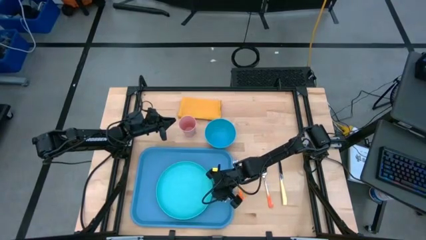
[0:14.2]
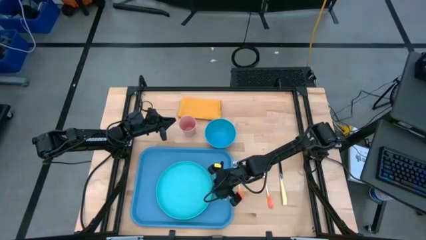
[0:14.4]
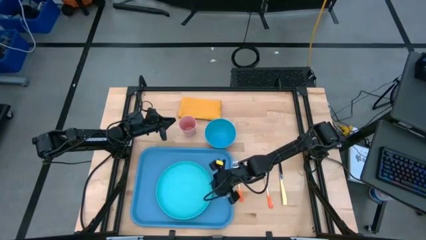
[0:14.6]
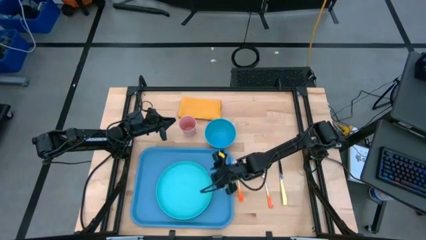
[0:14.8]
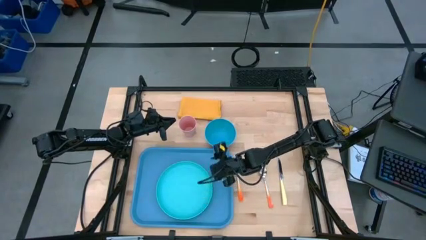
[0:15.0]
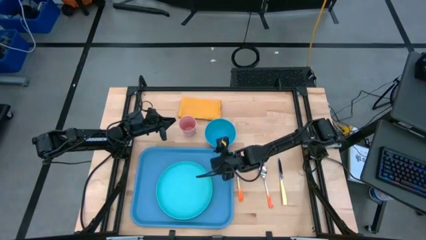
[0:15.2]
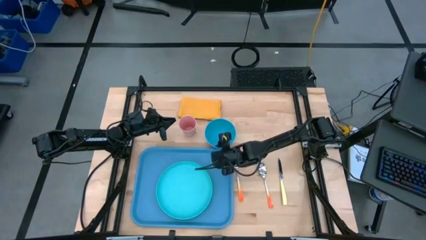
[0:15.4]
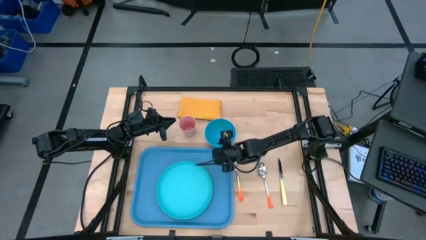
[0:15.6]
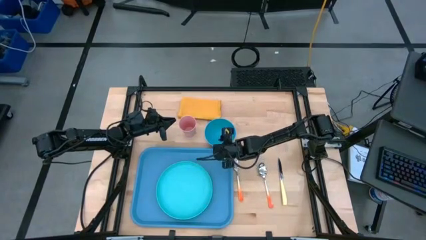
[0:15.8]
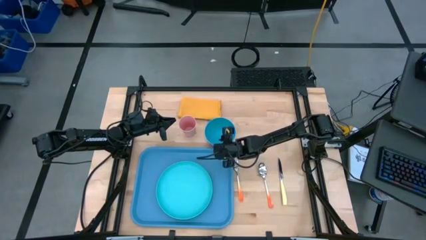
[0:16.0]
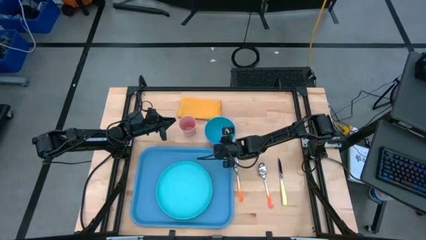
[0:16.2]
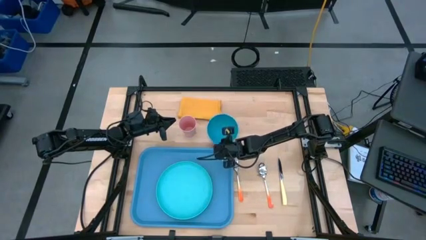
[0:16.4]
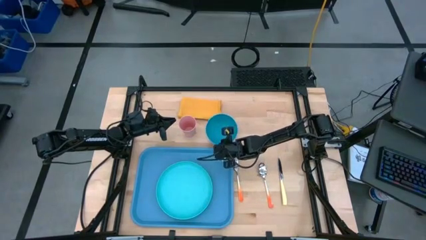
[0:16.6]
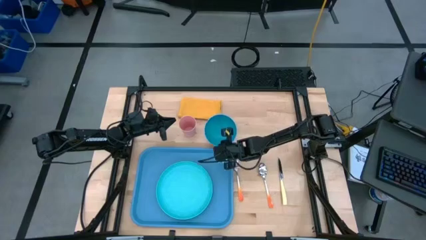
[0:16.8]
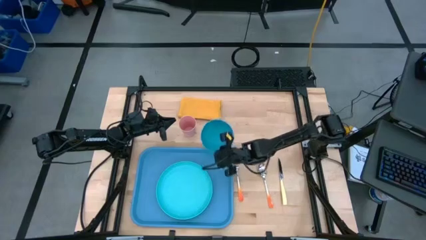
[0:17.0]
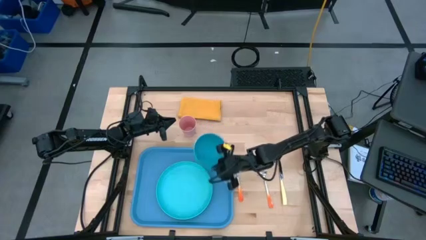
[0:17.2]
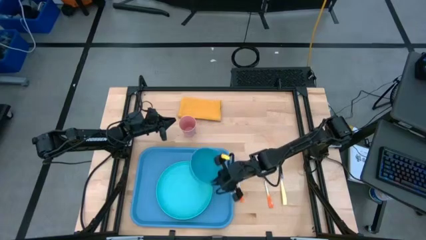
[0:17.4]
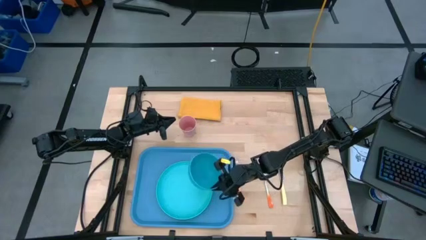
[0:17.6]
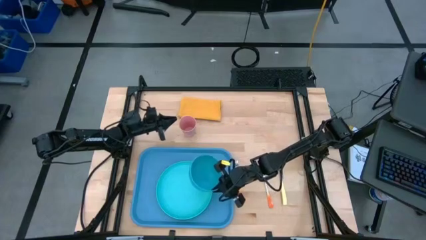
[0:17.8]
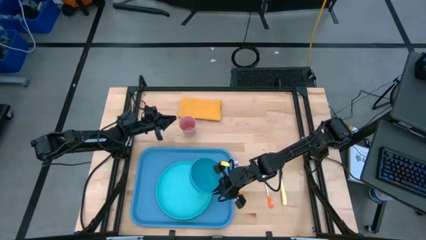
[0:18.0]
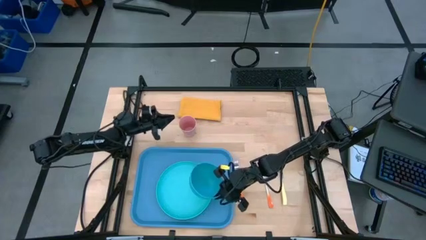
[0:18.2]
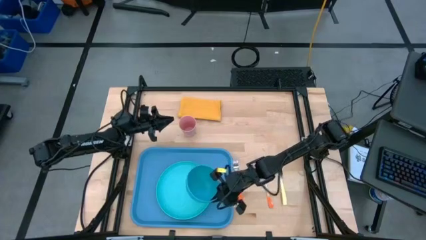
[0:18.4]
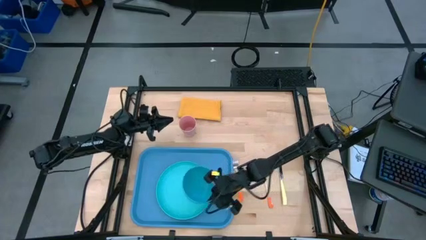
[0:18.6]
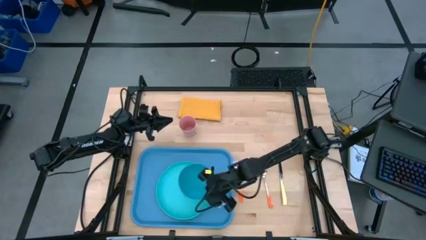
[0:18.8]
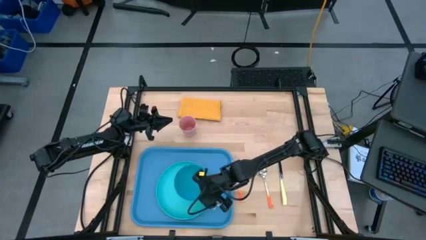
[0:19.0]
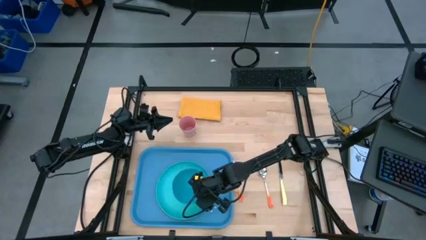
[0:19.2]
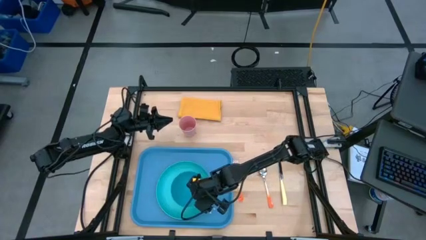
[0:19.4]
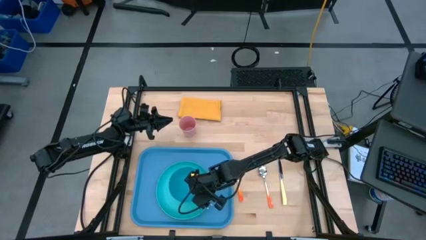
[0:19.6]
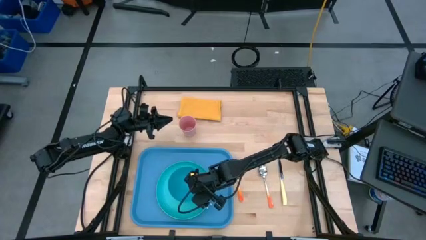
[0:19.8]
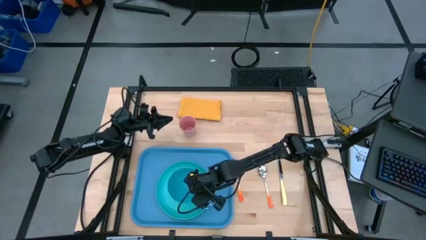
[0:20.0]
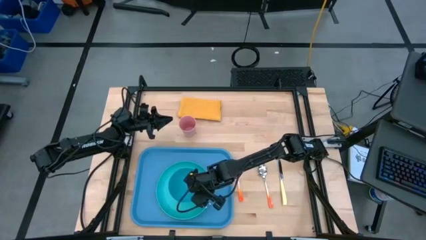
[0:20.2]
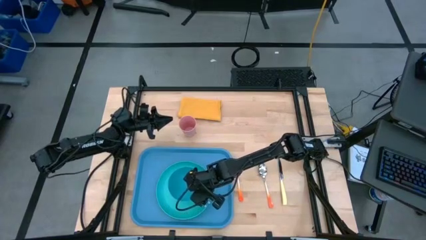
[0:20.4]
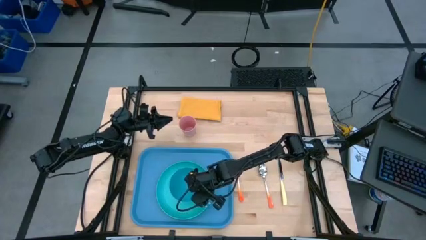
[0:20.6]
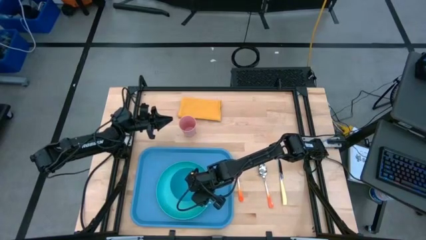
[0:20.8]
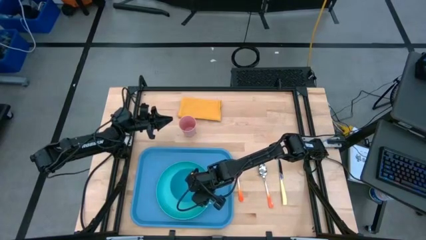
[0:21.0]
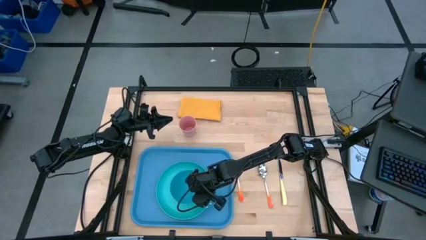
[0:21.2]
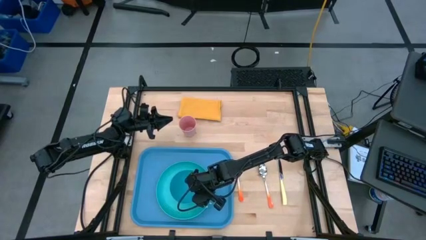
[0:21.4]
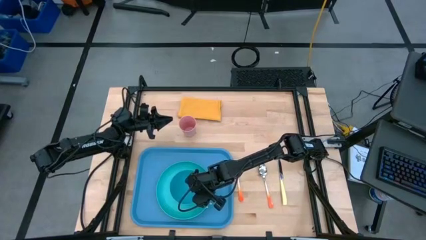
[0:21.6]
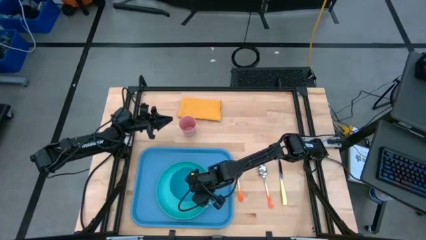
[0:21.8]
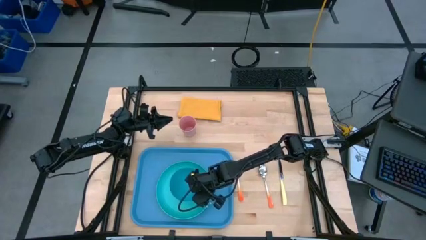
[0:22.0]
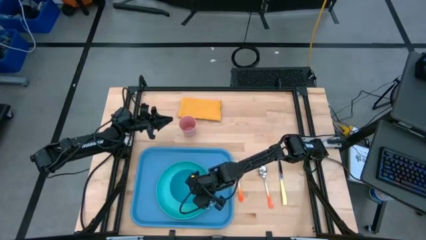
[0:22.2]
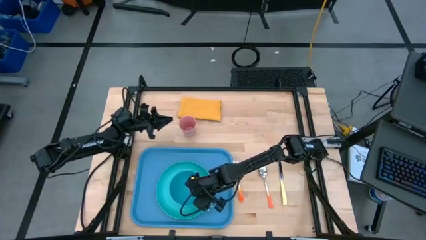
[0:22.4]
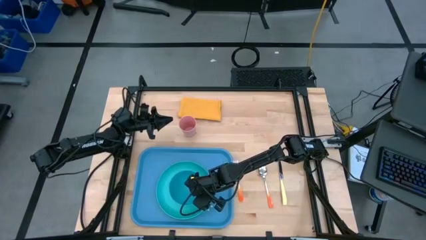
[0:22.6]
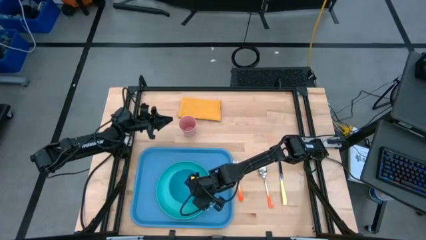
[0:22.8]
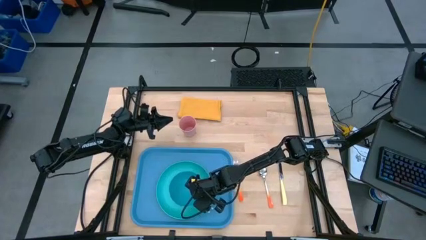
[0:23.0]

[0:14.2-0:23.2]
Task: Set up tray
Put the blue bowl on top of the green plate on the blue tray

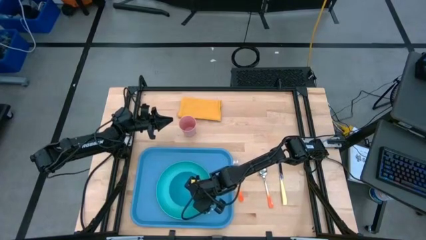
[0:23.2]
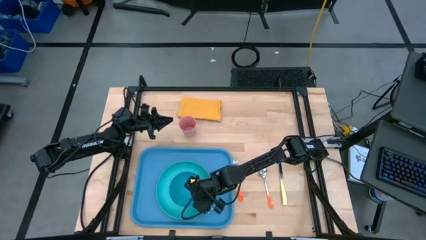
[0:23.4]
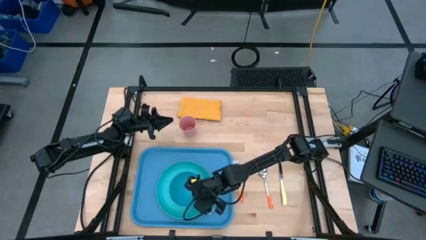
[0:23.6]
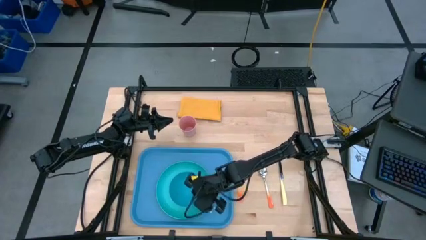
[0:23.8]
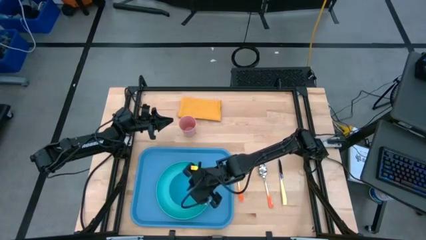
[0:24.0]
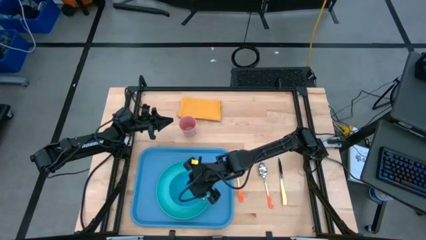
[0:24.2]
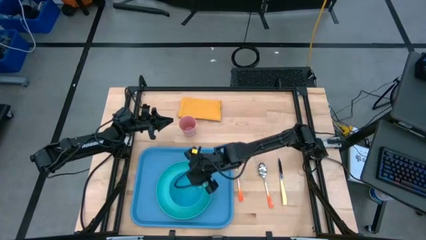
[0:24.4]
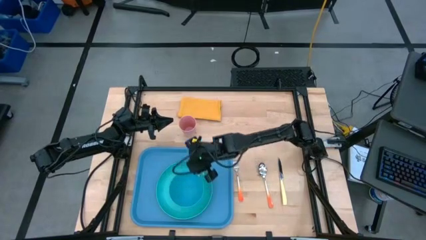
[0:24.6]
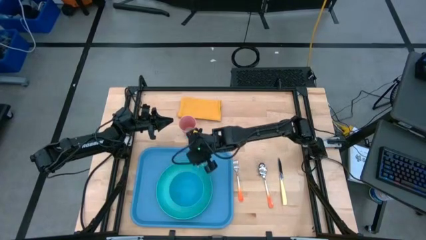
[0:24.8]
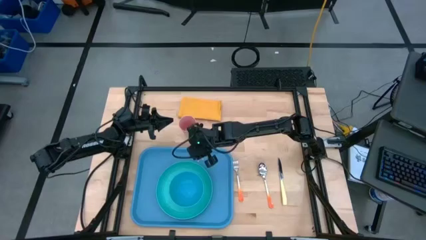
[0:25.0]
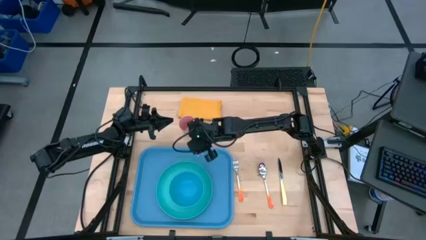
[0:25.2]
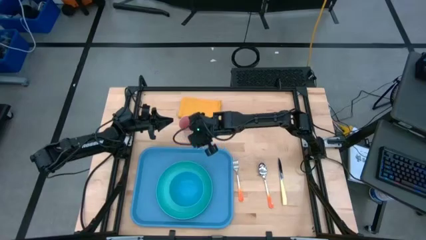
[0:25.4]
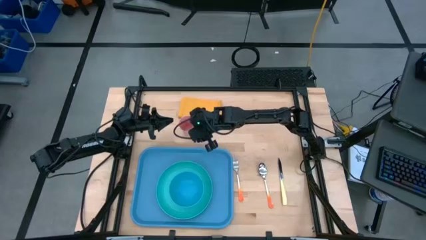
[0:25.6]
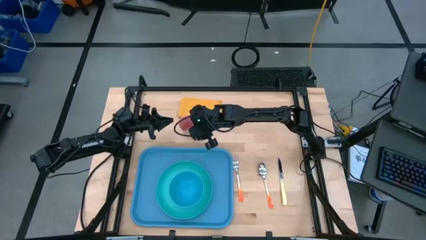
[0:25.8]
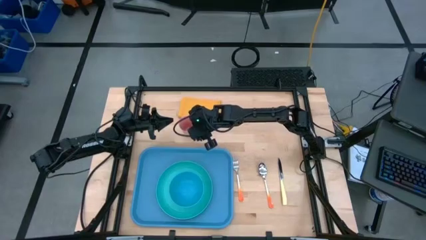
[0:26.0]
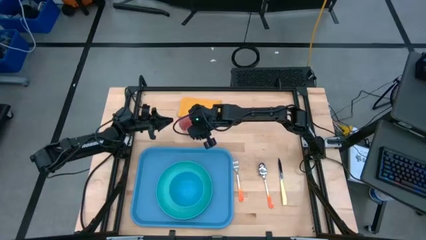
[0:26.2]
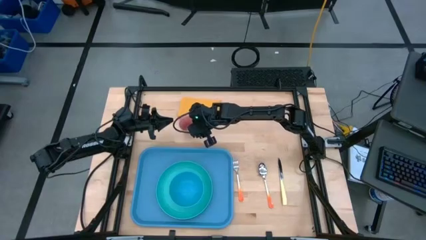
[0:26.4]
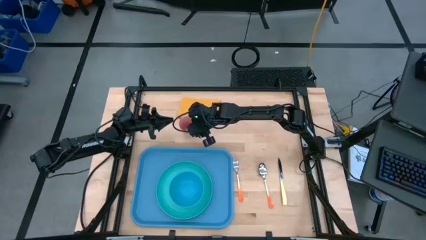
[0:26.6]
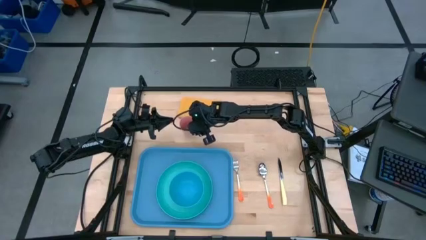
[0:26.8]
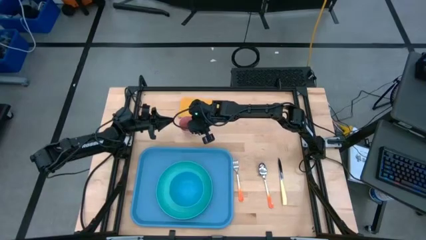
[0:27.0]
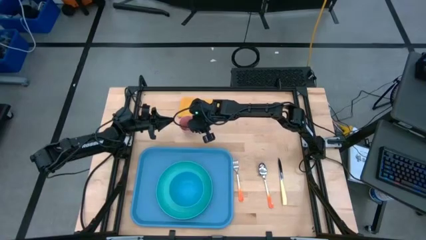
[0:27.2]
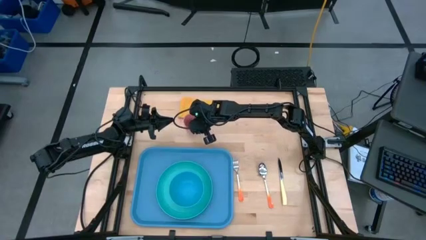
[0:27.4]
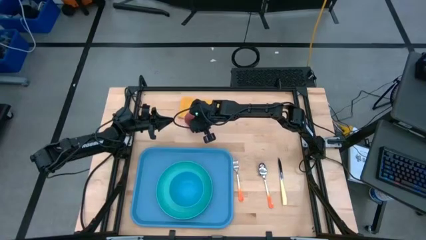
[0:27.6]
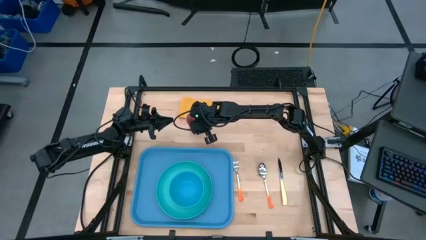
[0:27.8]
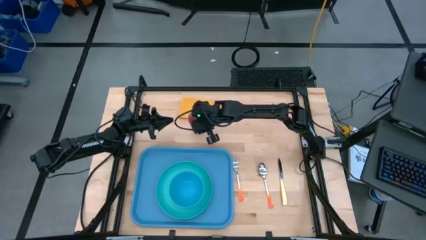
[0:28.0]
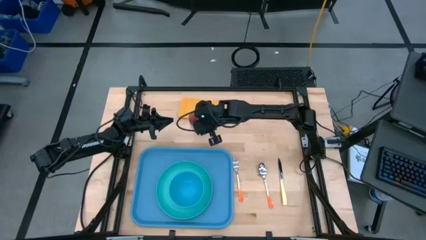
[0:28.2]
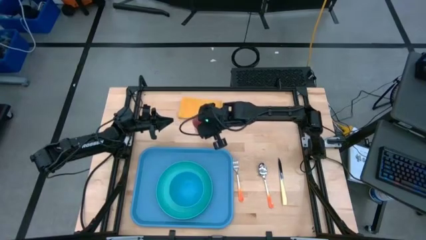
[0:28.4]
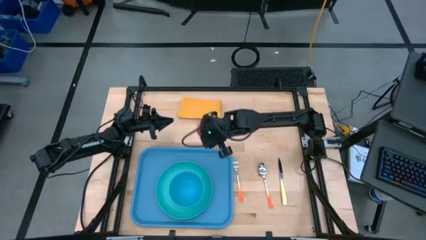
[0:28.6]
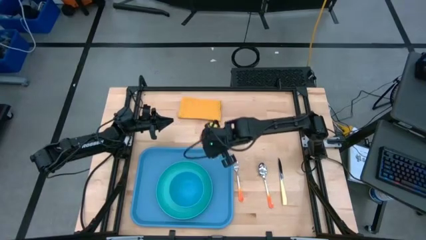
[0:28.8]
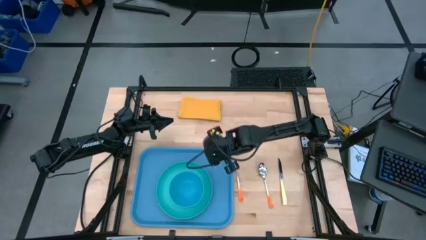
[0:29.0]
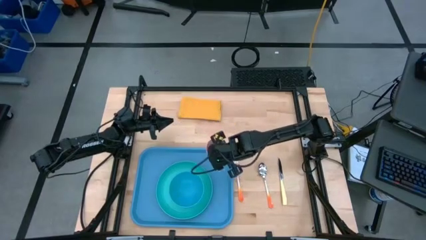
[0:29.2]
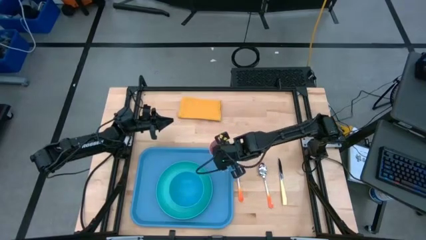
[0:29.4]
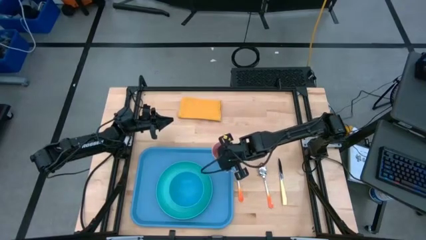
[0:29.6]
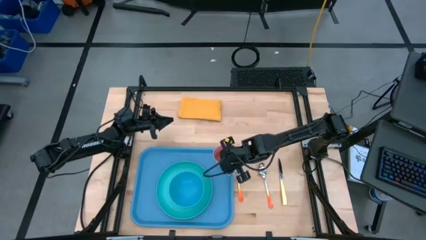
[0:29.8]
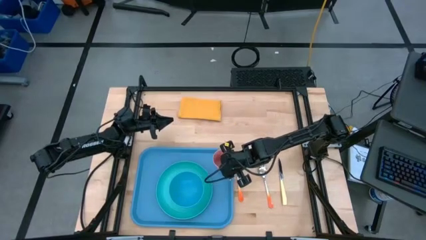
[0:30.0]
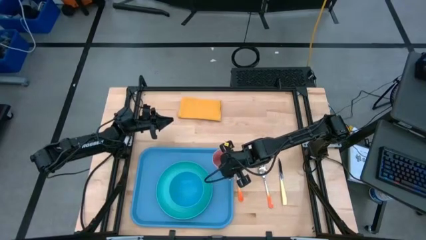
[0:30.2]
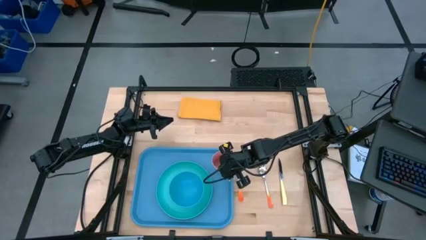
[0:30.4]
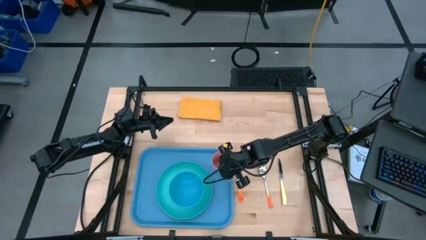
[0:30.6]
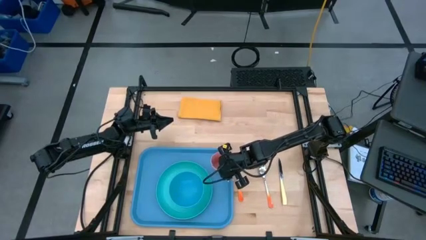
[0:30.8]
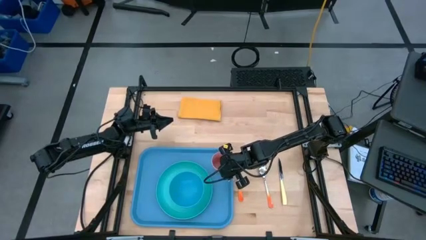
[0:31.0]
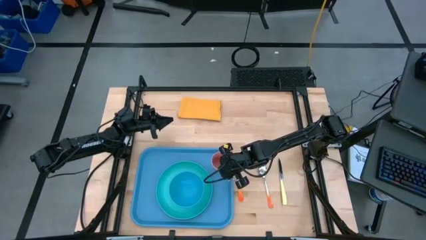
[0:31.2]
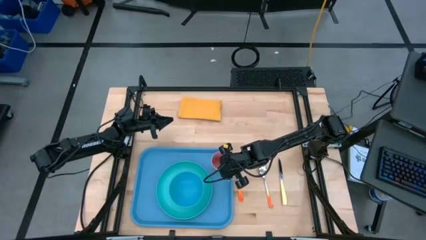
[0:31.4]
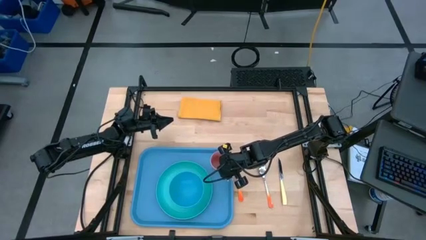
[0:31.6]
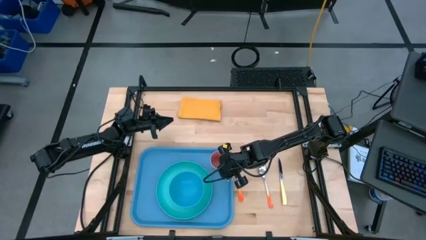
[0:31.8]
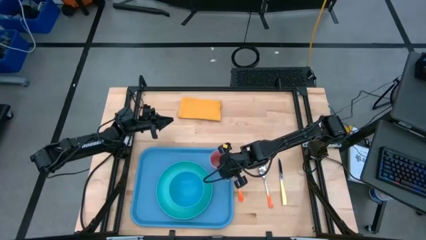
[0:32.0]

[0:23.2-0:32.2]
Put the pink cup on the blue tray to the top right of the green plate
